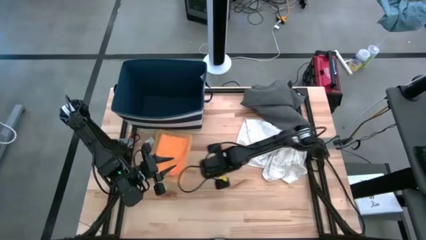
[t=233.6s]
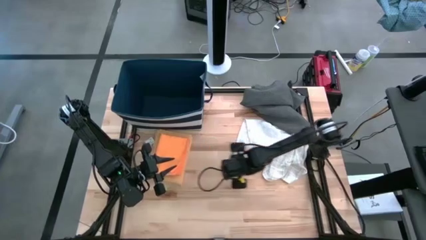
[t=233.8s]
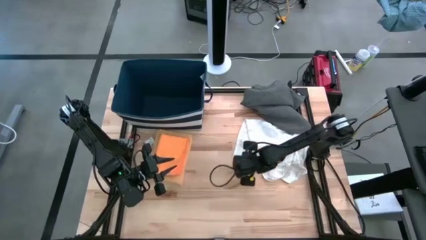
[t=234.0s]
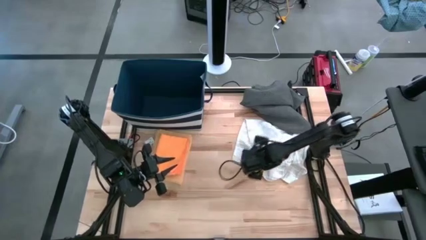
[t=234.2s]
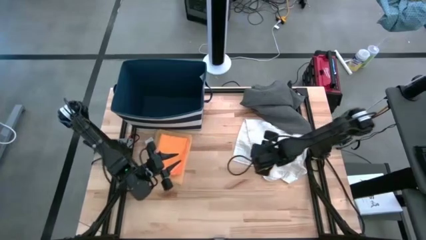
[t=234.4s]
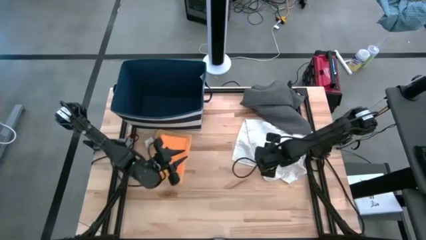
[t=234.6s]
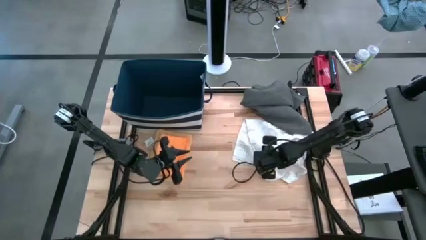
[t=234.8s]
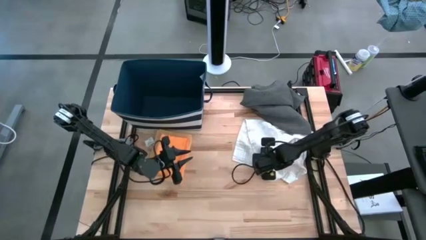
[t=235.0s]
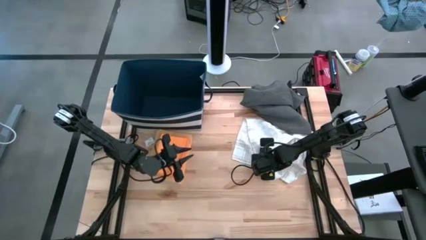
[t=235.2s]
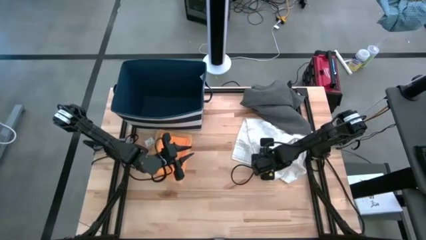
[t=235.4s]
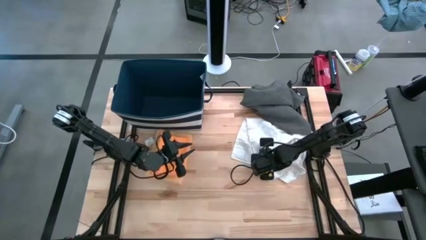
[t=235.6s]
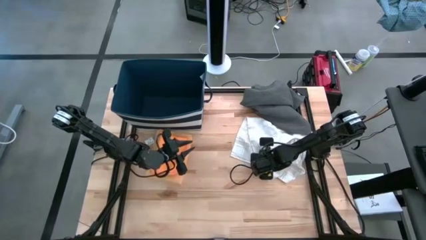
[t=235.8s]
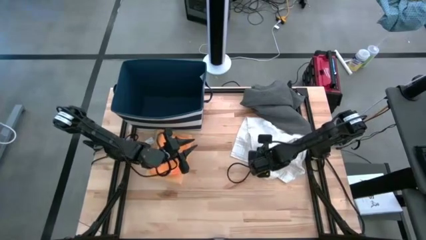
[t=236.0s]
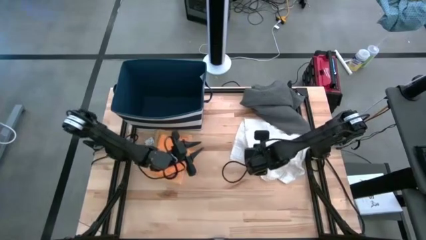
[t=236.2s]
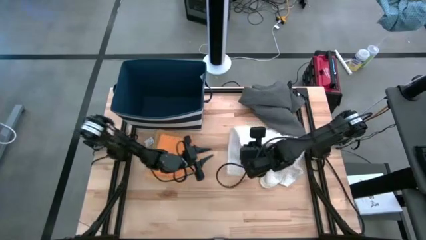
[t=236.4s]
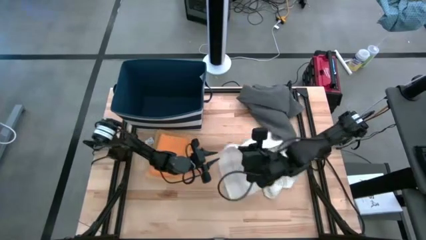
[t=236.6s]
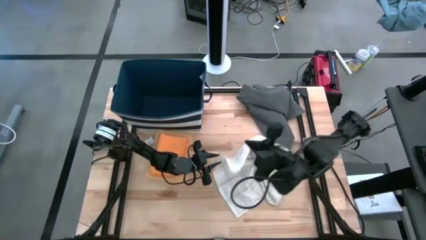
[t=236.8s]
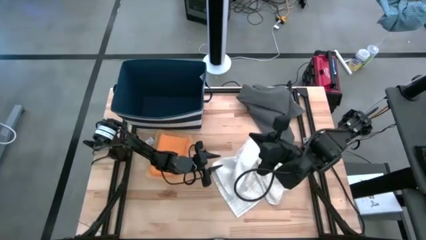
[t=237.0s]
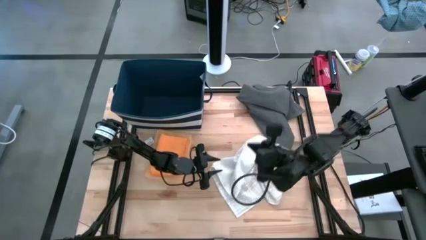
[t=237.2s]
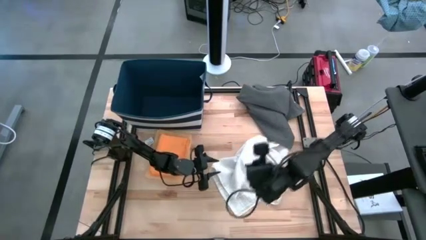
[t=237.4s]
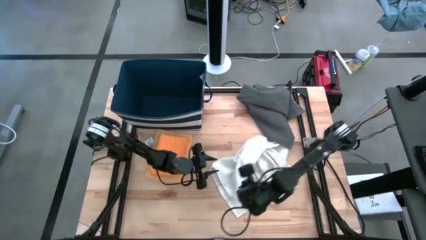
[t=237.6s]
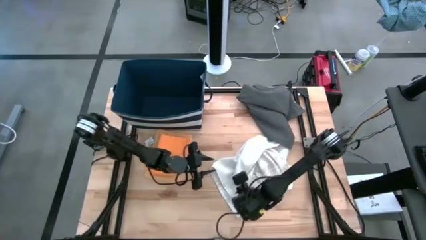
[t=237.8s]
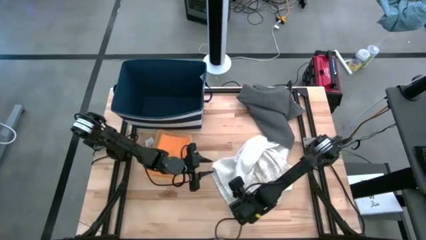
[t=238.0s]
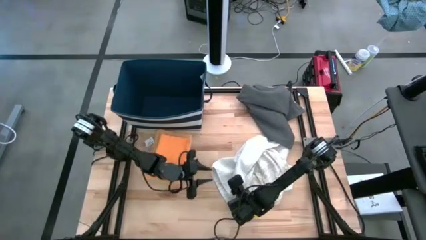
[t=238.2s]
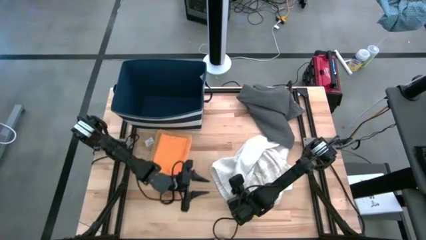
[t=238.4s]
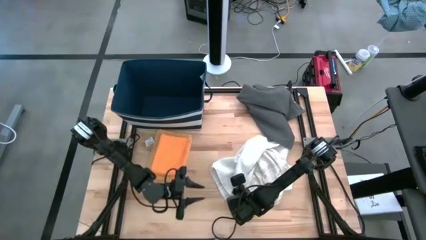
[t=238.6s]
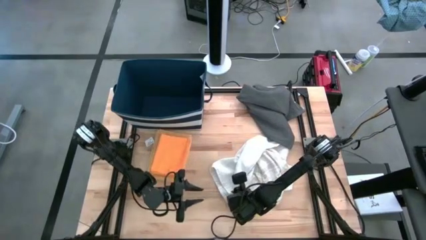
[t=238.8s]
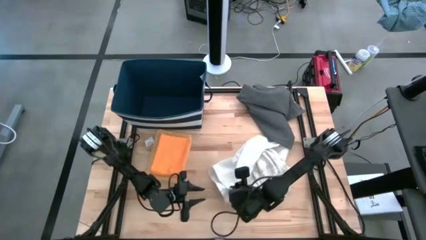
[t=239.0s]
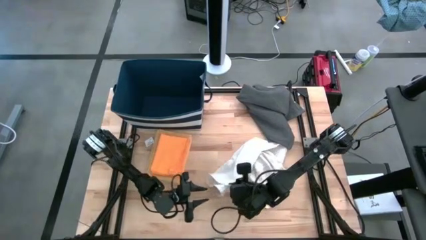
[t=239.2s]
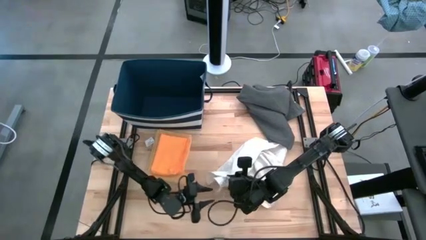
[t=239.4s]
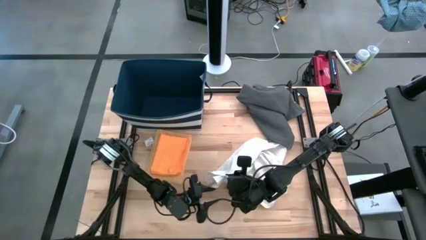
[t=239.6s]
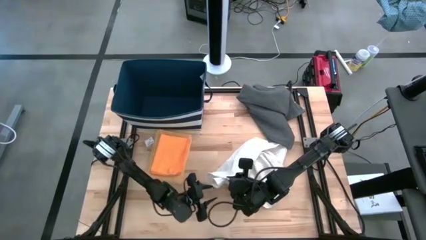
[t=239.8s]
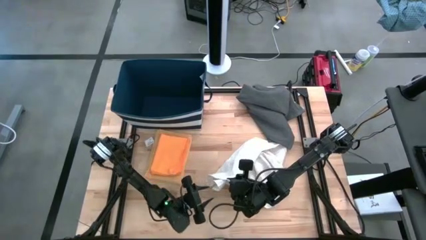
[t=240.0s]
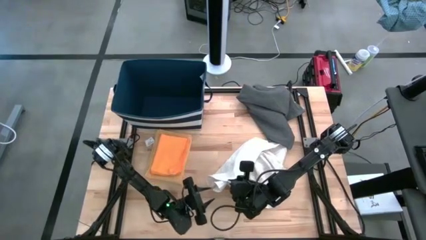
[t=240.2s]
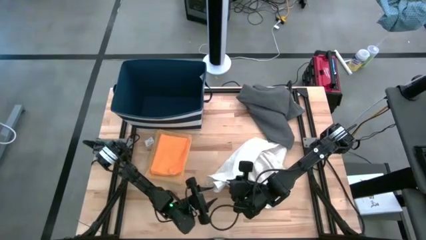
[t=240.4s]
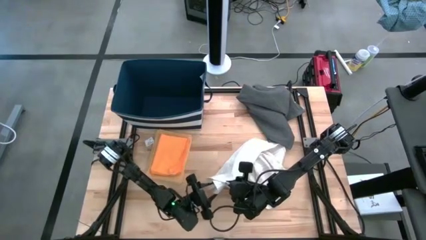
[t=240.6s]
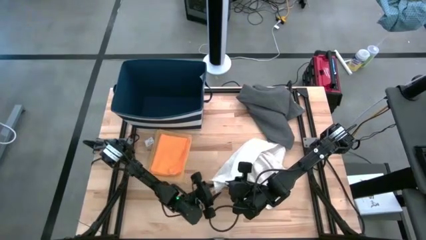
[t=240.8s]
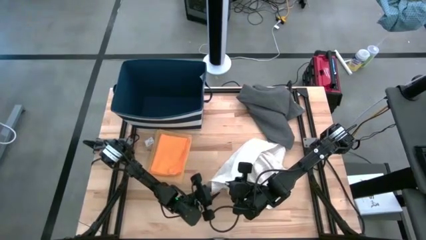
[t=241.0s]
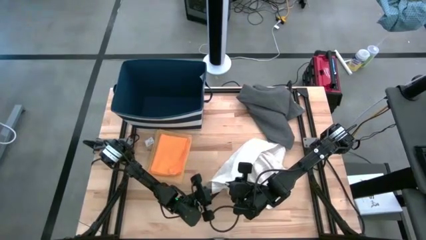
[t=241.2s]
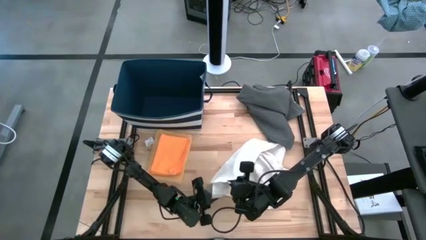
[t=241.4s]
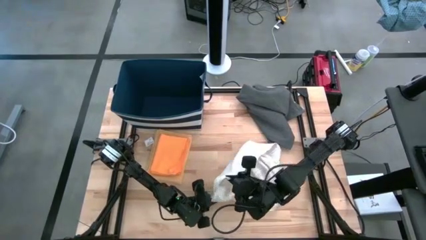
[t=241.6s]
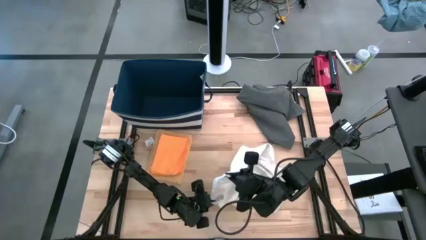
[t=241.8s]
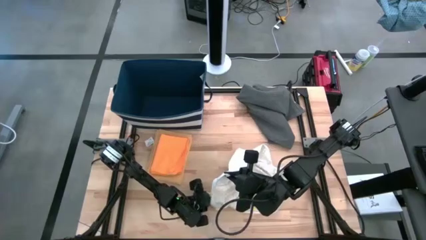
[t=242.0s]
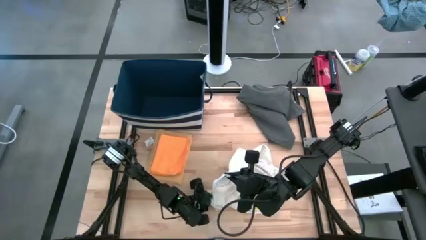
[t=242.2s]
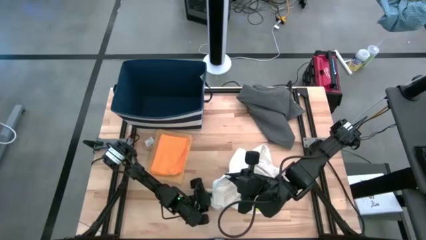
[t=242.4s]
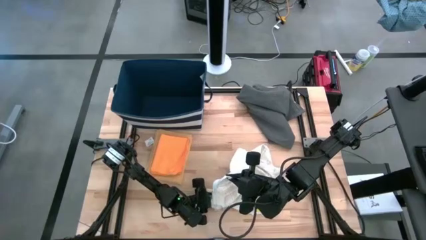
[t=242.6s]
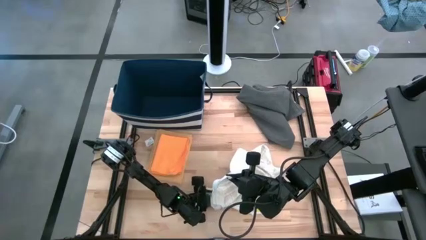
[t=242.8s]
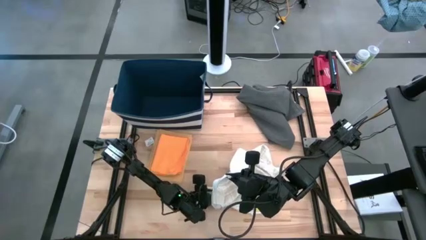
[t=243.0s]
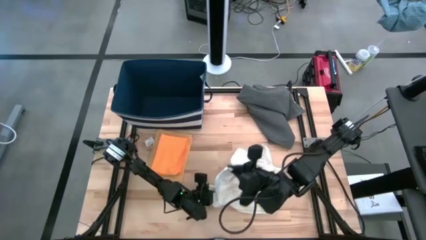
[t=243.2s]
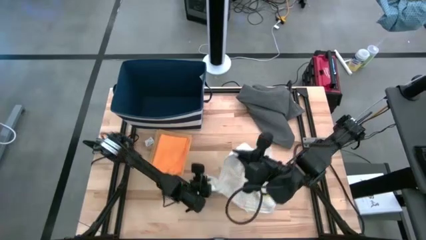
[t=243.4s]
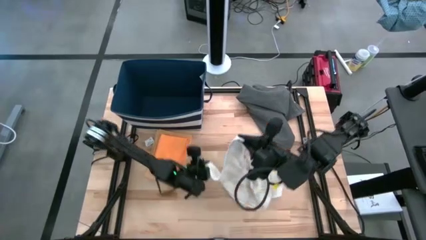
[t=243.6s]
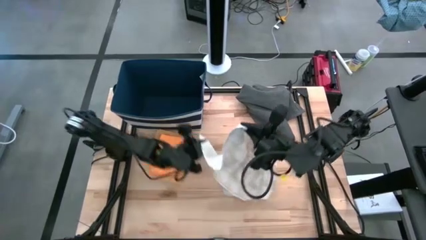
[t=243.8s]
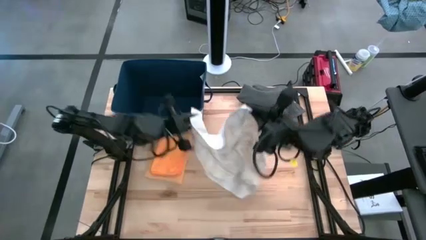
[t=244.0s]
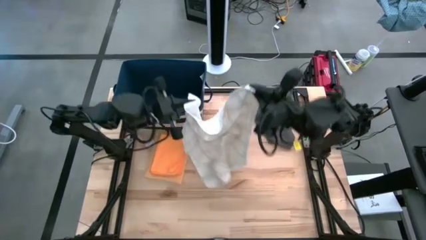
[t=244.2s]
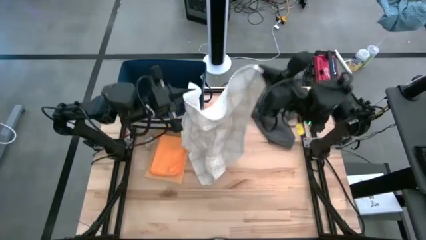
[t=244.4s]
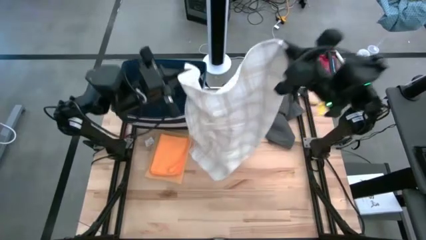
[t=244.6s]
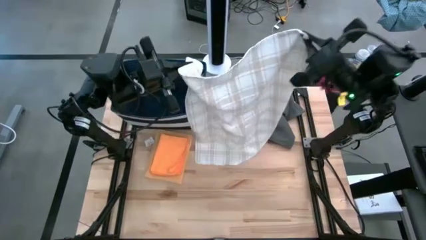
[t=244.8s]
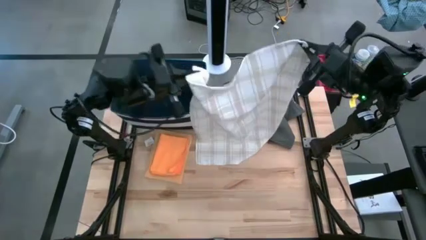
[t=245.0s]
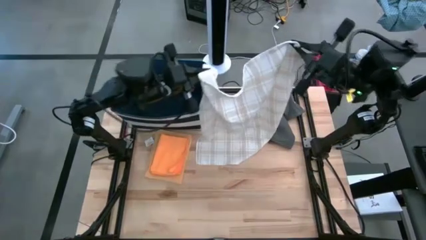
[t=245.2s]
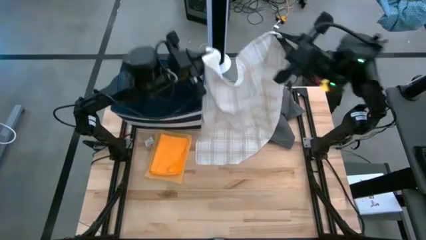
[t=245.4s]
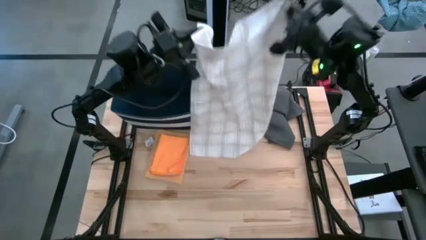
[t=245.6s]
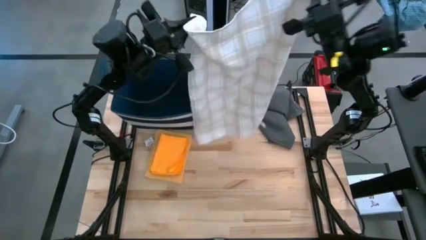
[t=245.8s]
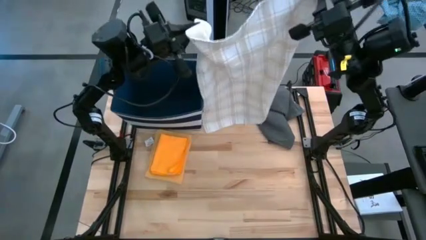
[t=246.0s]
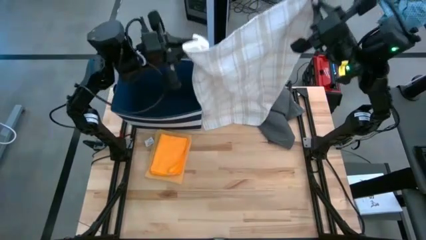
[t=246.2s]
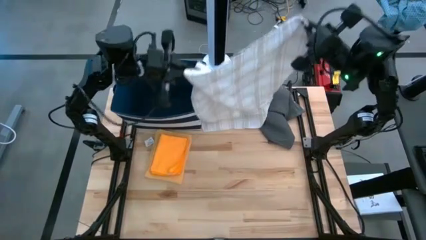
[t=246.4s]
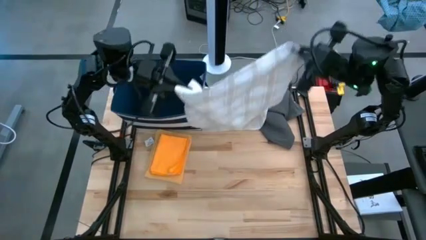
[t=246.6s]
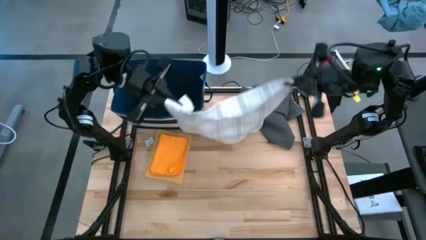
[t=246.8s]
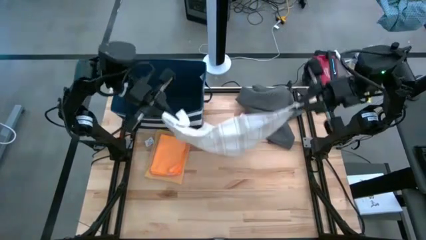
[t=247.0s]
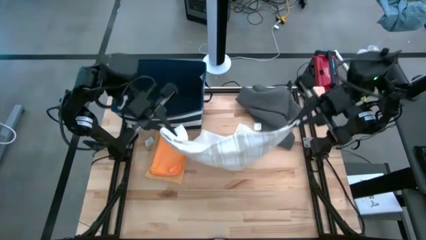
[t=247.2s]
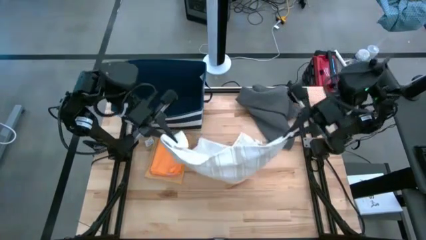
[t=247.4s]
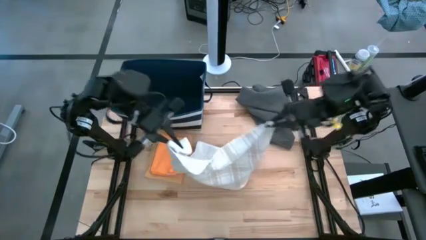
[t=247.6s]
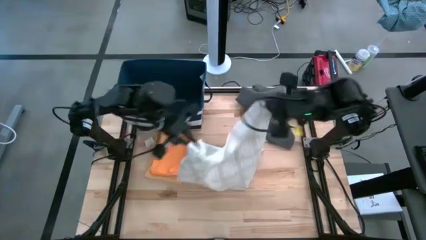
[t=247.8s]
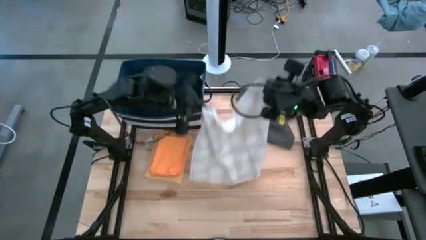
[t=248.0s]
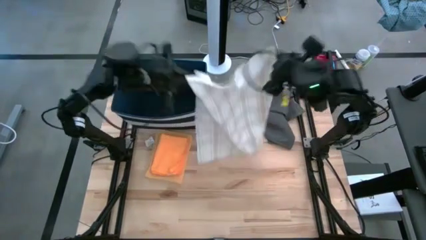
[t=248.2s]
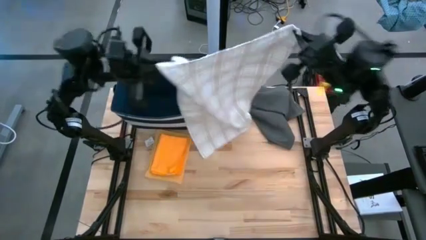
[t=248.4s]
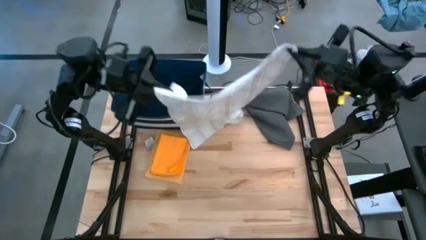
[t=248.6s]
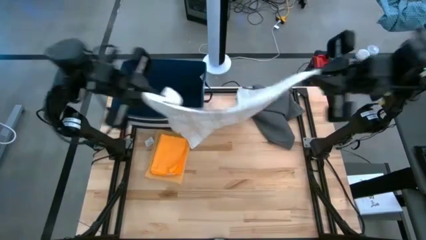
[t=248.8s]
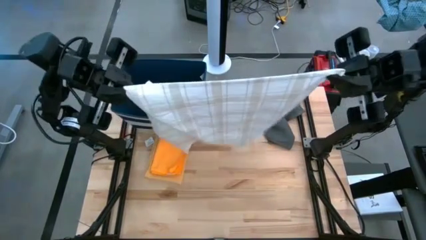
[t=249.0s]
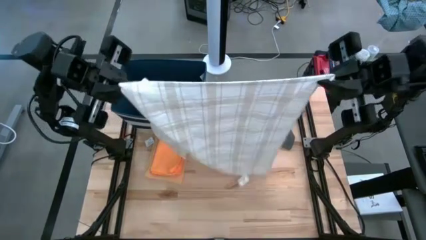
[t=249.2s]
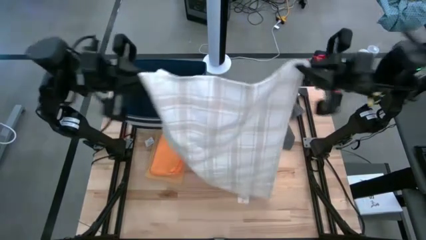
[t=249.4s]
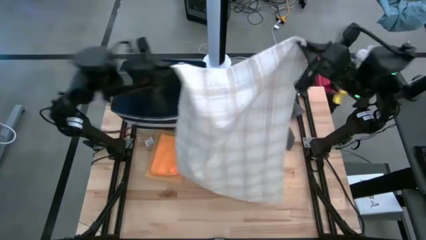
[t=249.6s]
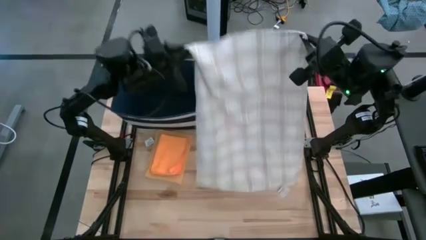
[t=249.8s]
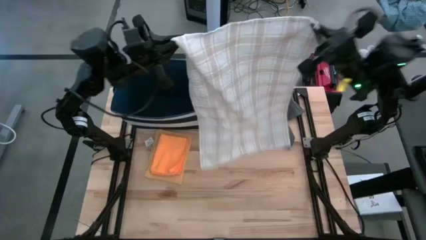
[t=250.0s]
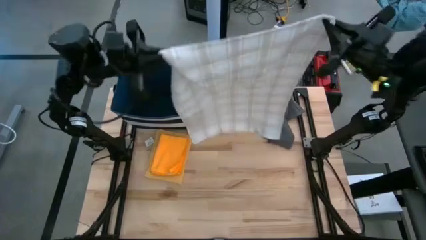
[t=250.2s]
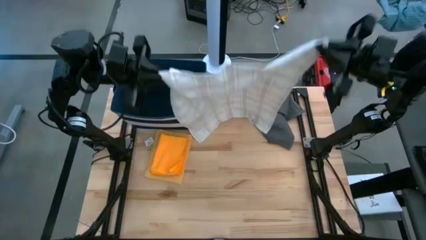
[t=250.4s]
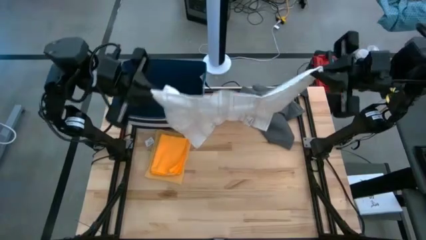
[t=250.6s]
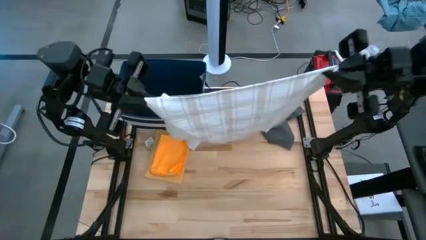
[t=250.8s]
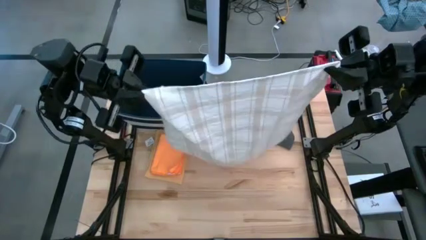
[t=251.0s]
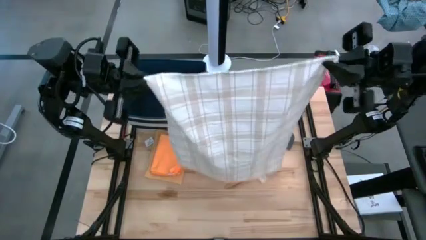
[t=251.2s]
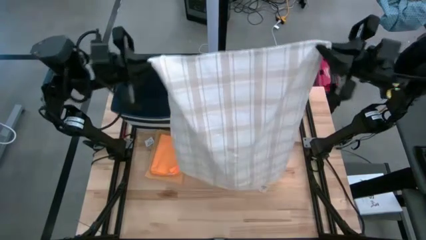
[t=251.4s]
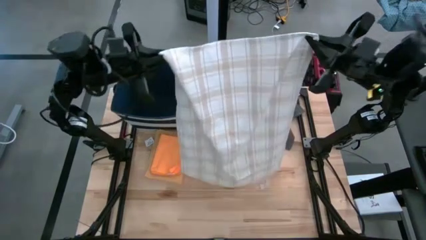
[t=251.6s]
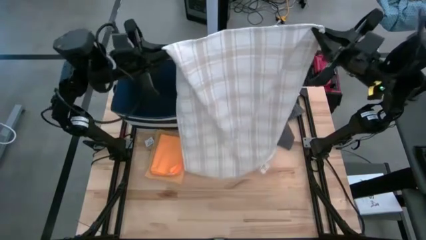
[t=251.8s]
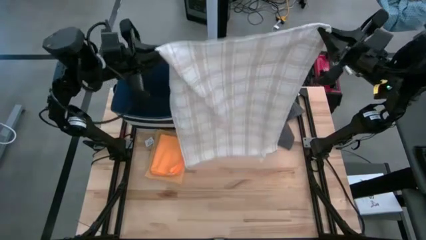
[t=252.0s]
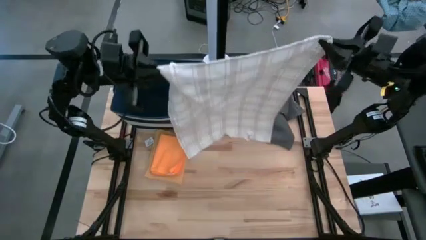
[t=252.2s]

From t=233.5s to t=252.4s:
Task: Fold towel
Fold the white patterned kitchen towel
